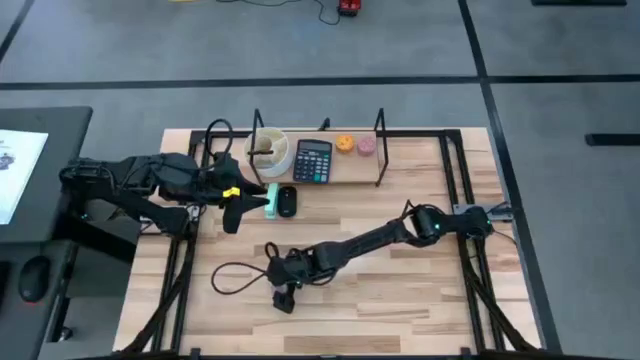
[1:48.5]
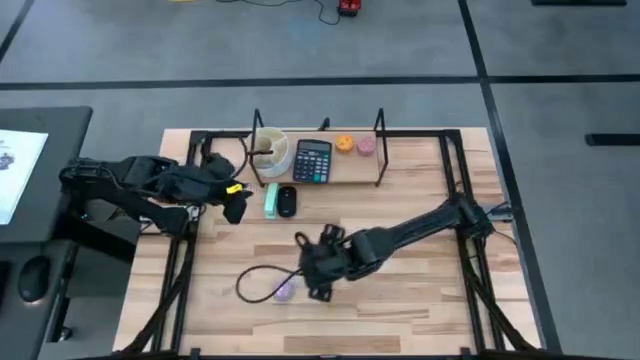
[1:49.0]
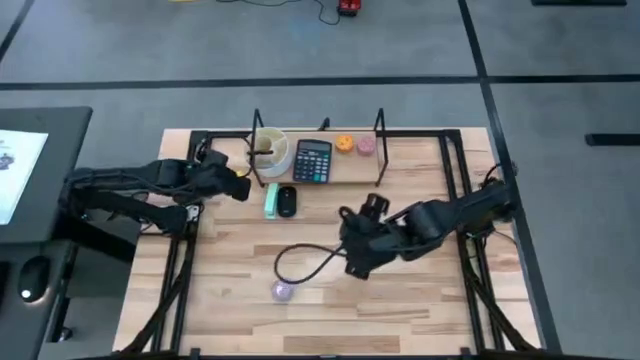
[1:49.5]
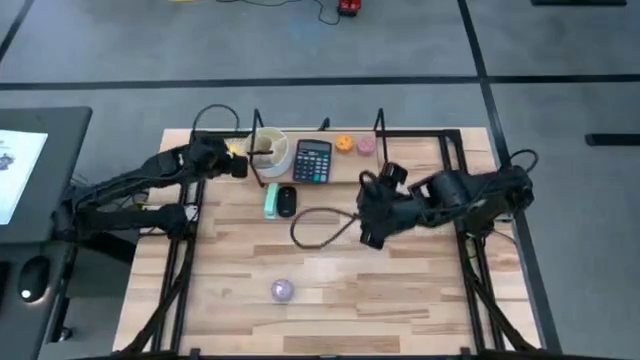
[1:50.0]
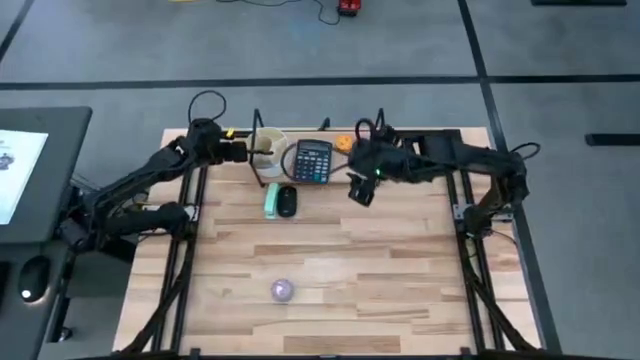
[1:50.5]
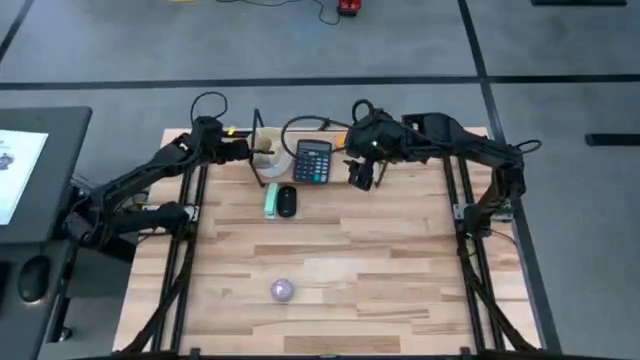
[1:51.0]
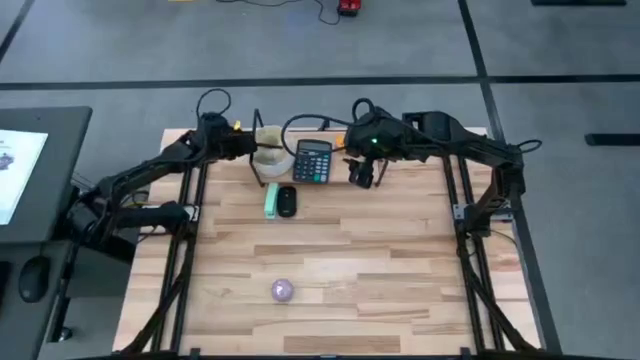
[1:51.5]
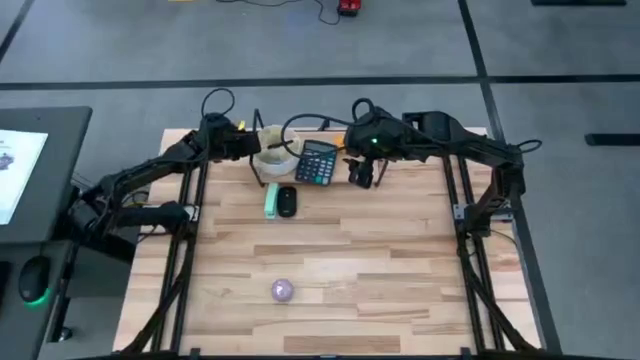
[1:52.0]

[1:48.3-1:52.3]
Task: Stock shelves
Adjust the white pen organizer

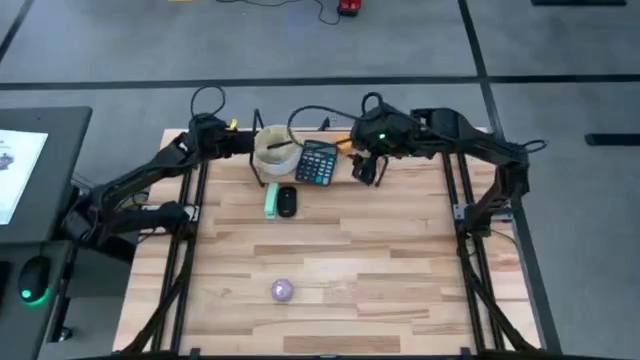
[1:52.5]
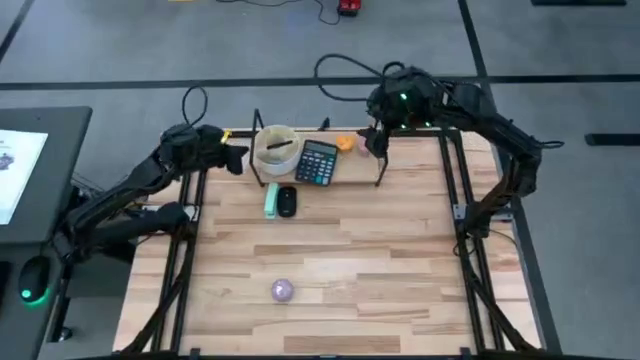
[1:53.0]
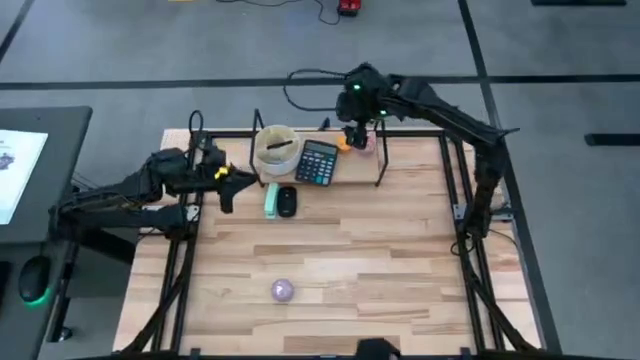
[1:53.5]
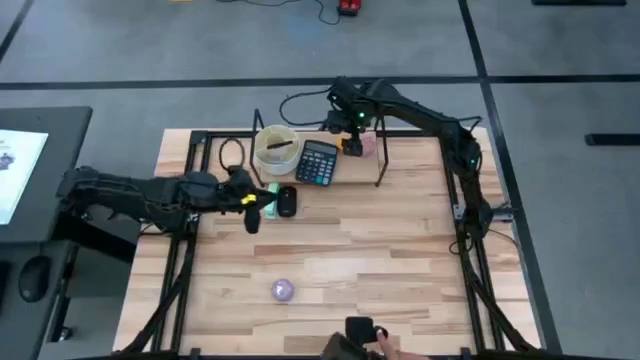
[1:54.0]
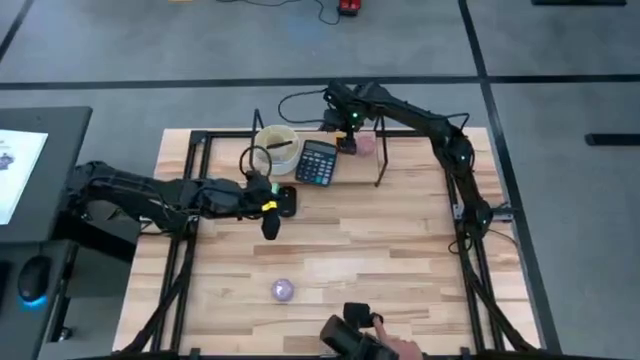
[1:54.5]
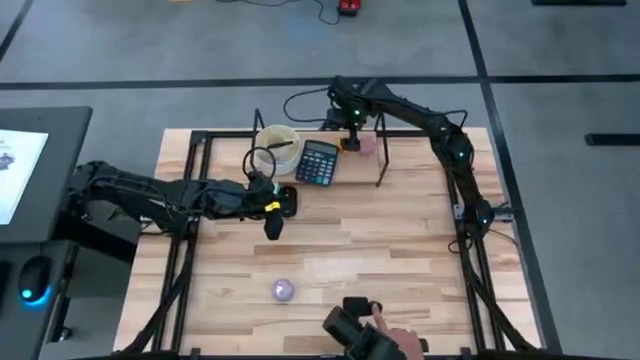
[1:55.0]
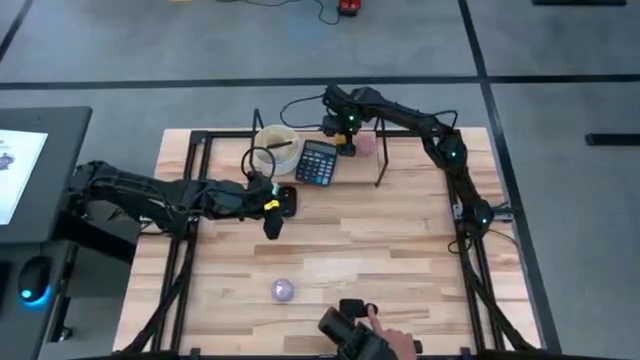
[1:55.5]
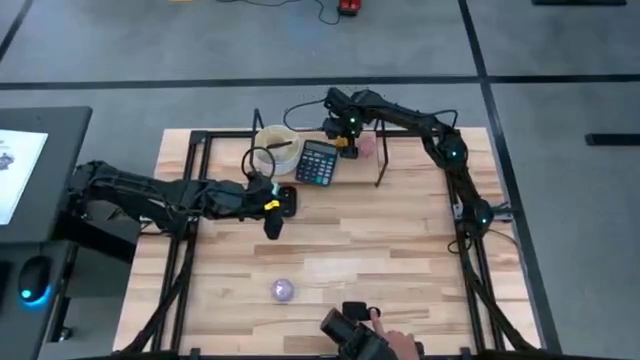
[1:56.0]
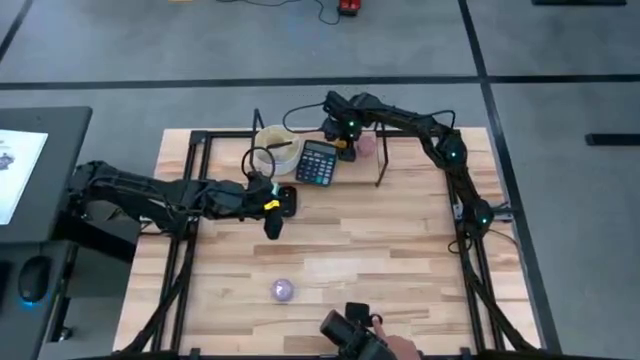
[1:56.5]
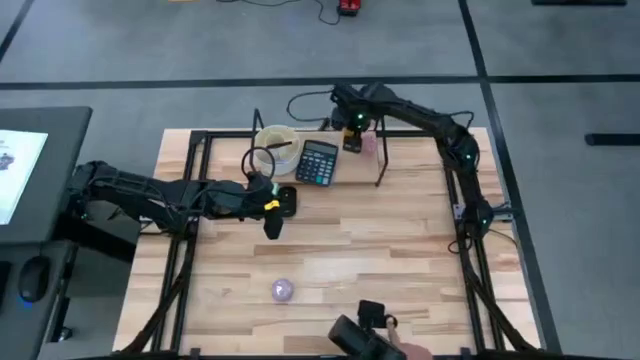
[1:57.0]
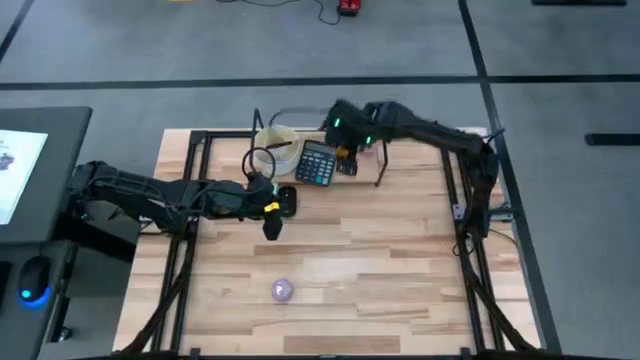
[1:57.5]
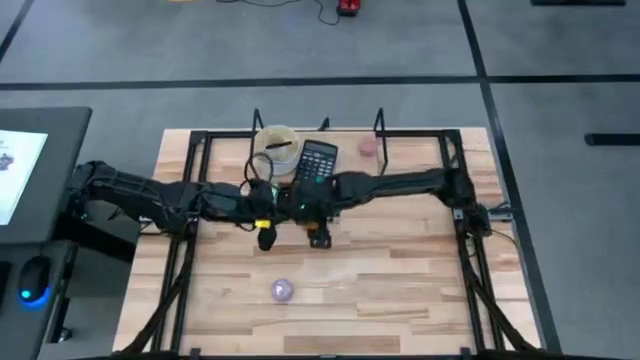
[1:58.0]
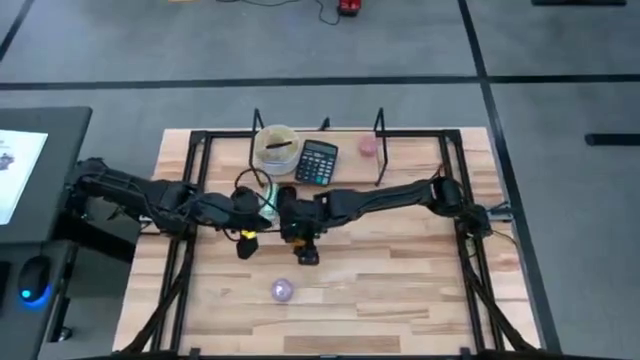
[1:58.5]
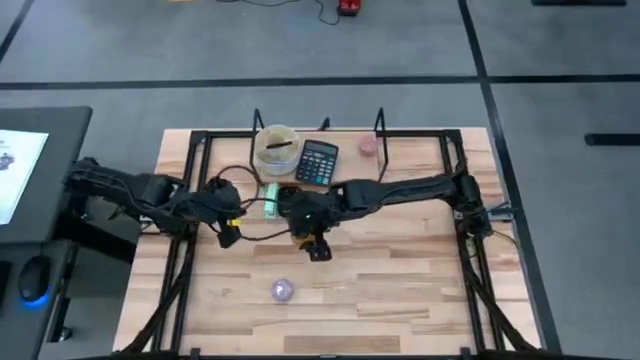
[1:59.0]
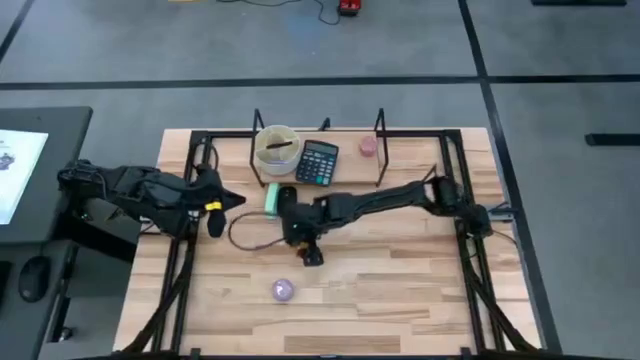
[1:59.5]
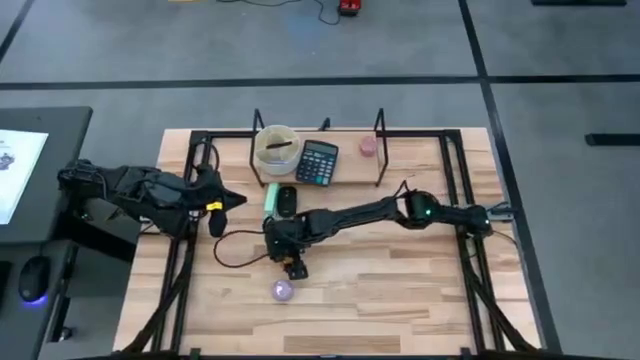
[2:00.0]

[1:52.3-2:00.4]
Remove the yellow scented candle from the shelf

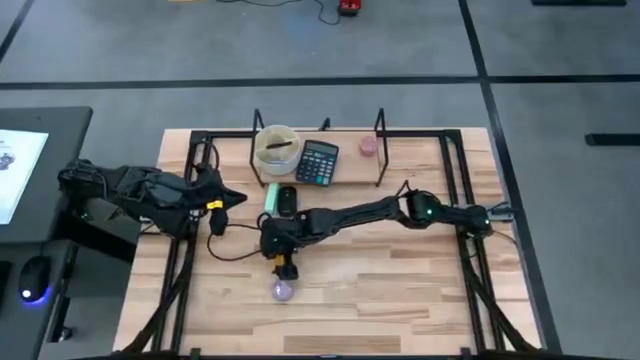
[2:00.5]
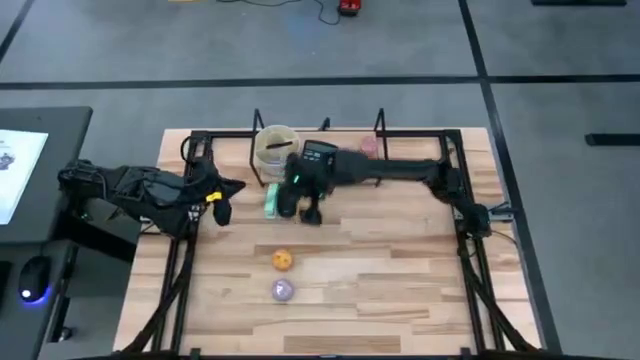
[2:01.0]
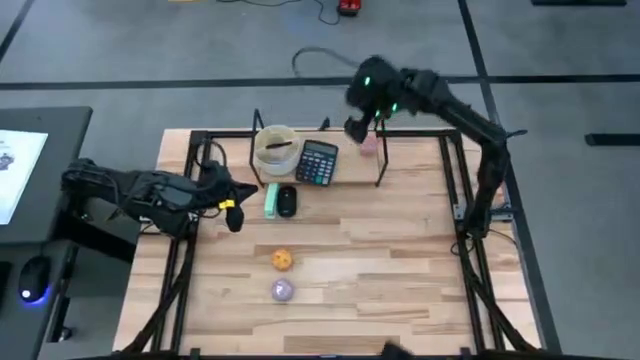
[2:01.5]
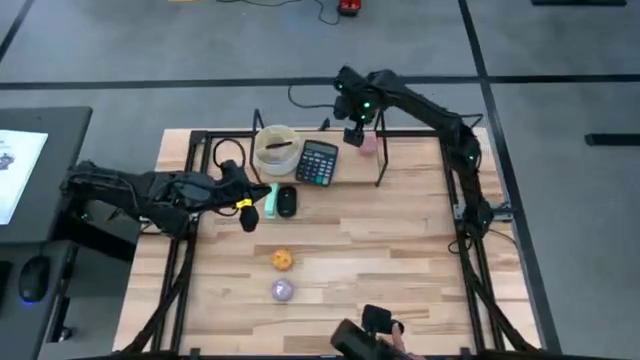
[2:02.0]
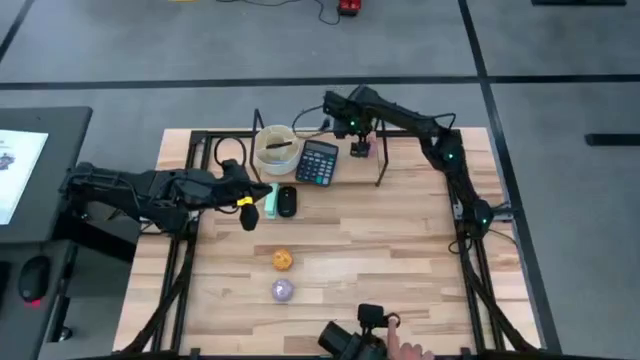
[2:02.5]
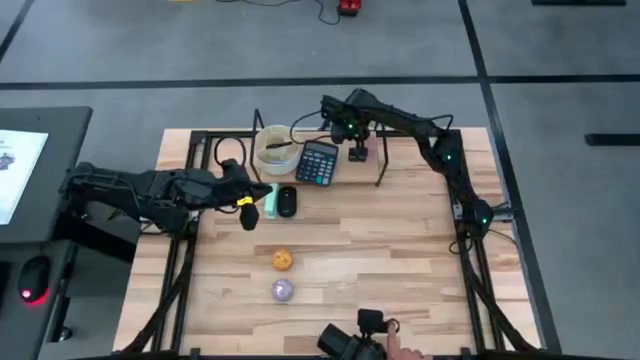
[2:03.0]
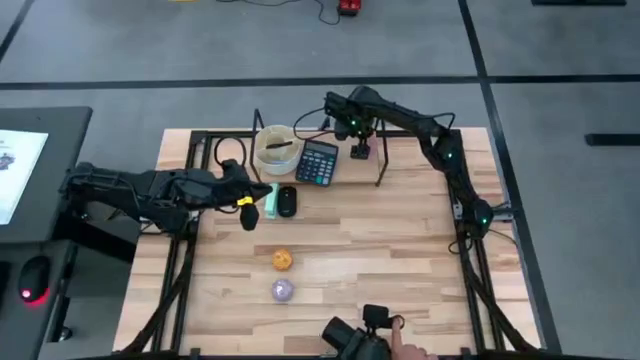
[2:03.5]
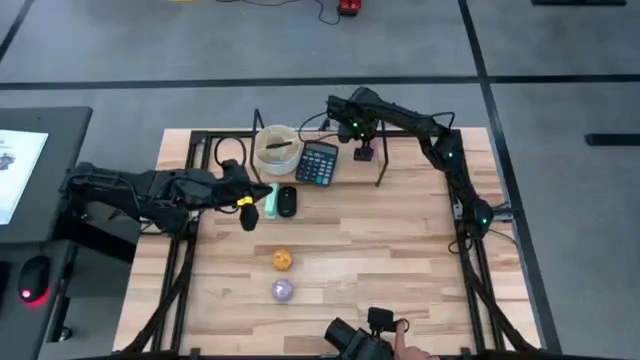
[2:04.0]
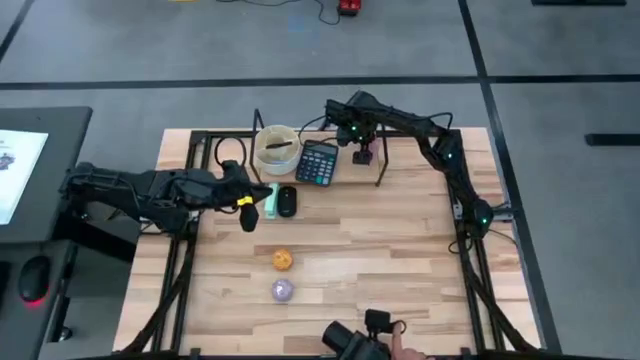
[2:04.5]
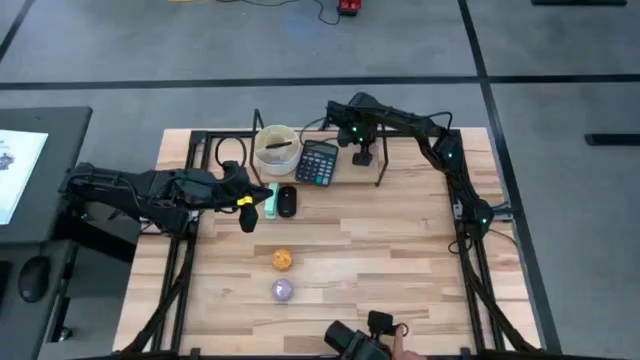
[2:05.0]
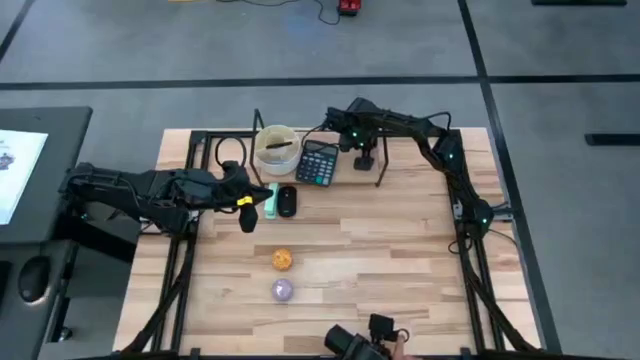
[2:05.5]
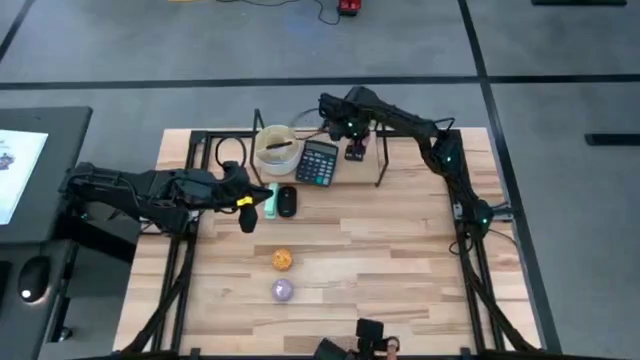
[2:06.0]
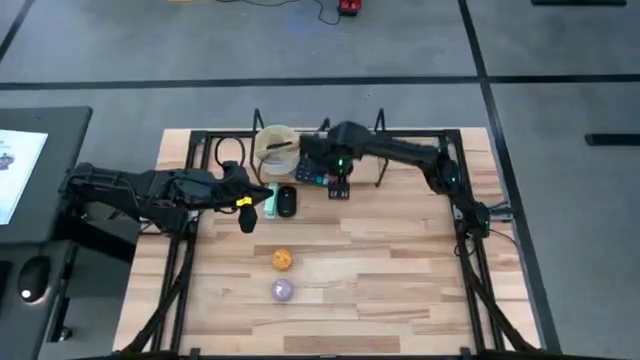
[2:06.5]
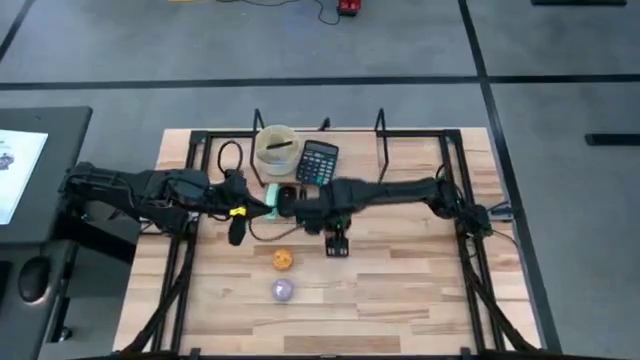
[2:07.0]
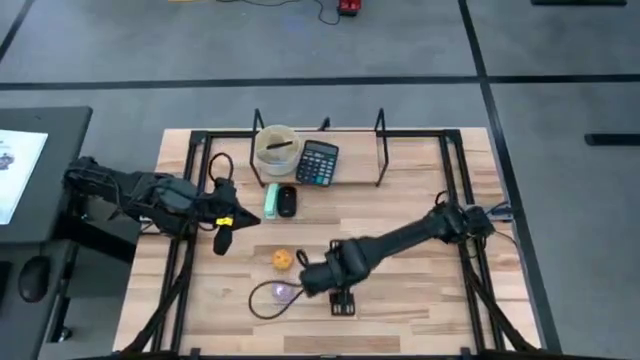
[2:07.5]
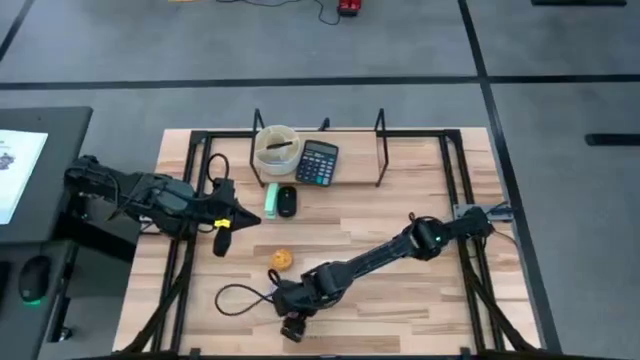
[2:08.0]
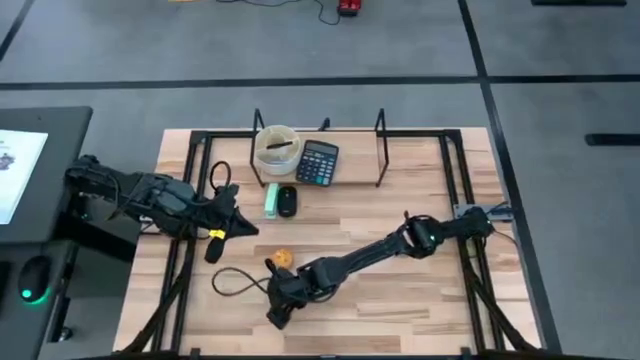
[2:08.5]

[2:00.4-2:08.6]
Remove the pink scented candle from the shelf
